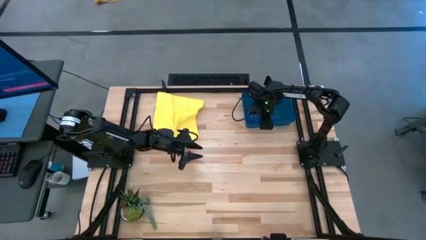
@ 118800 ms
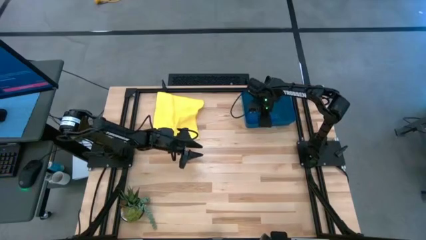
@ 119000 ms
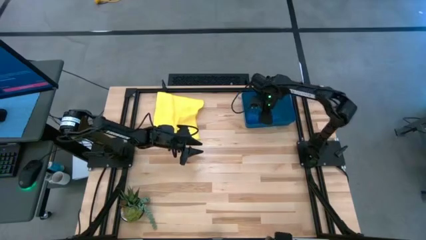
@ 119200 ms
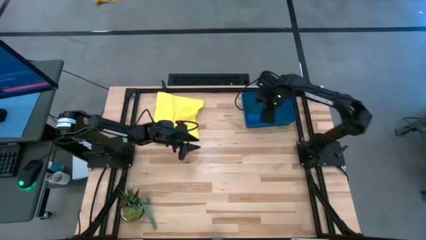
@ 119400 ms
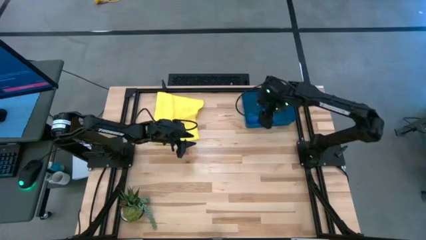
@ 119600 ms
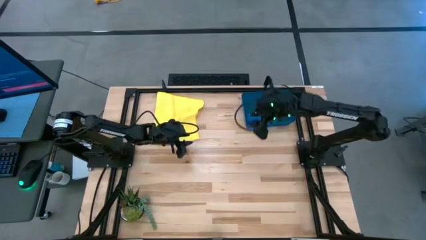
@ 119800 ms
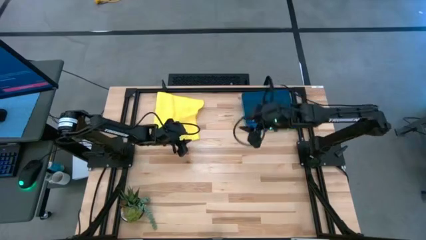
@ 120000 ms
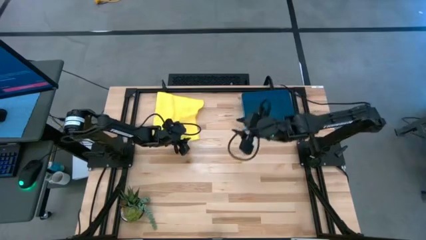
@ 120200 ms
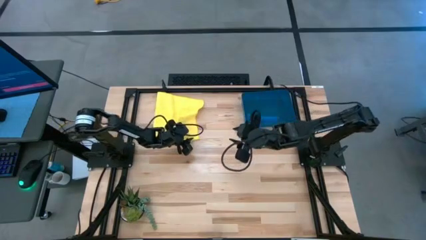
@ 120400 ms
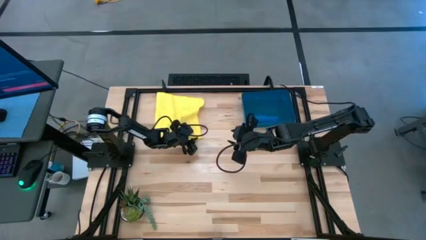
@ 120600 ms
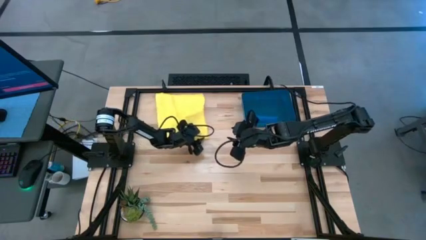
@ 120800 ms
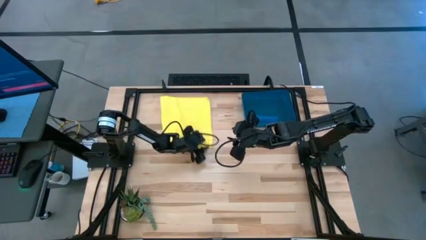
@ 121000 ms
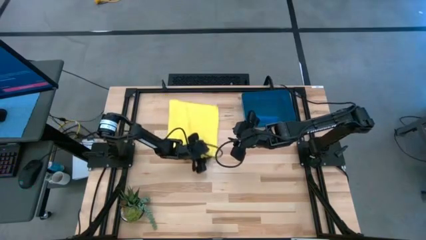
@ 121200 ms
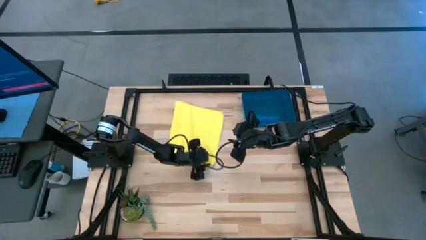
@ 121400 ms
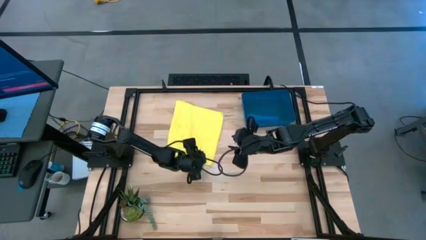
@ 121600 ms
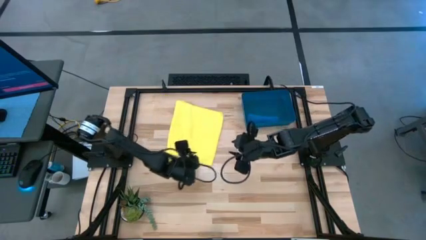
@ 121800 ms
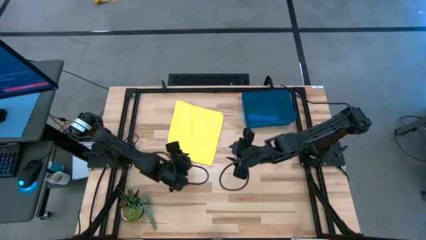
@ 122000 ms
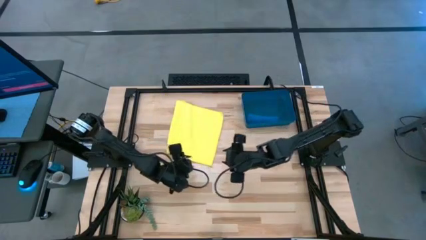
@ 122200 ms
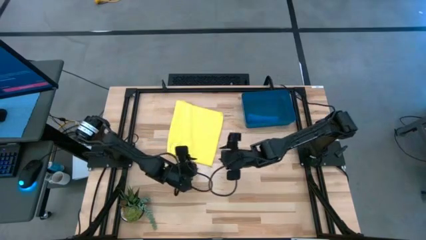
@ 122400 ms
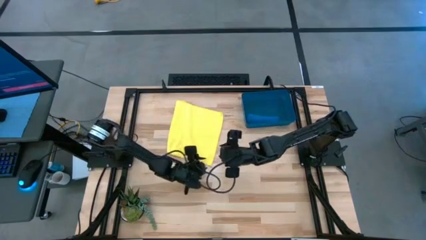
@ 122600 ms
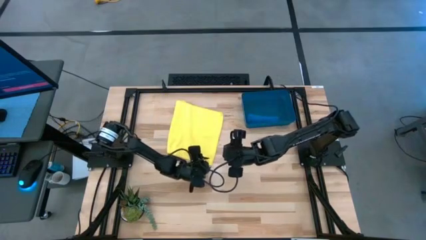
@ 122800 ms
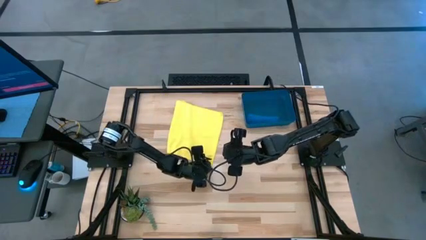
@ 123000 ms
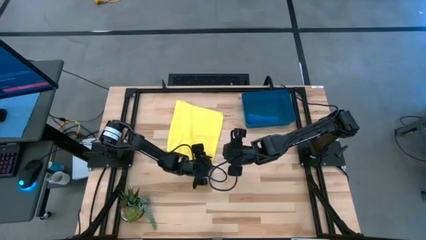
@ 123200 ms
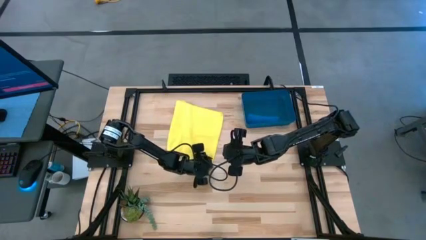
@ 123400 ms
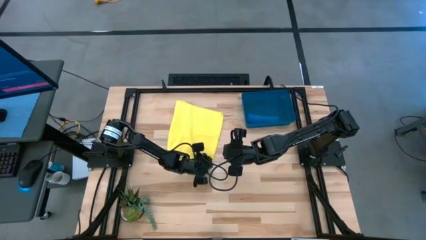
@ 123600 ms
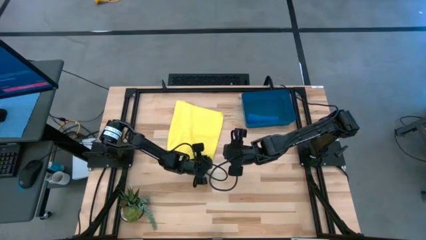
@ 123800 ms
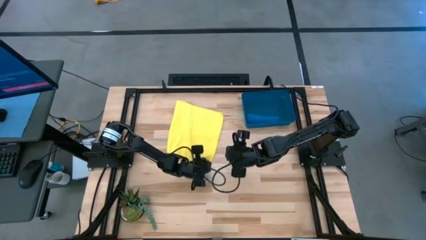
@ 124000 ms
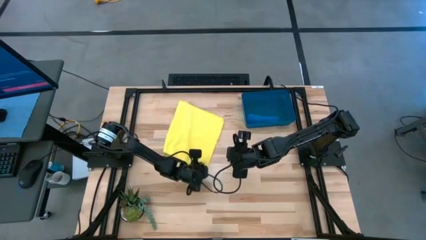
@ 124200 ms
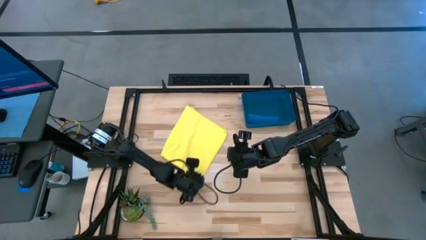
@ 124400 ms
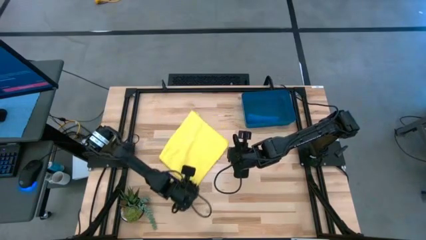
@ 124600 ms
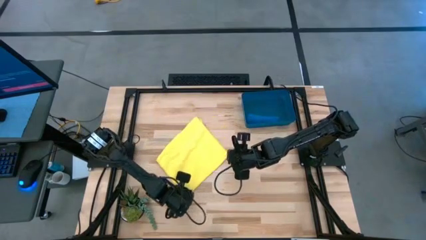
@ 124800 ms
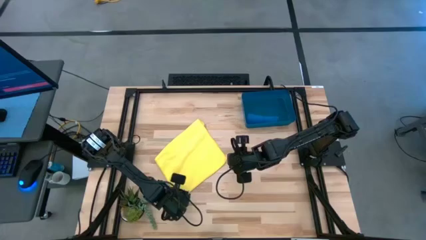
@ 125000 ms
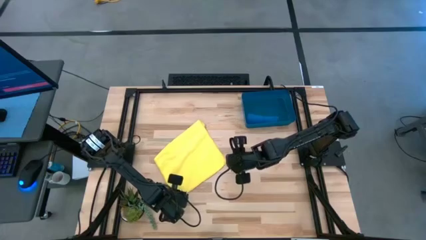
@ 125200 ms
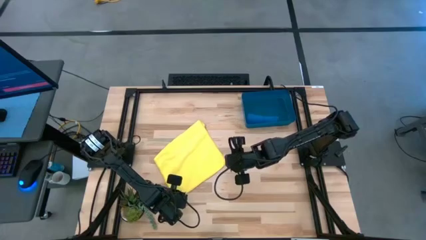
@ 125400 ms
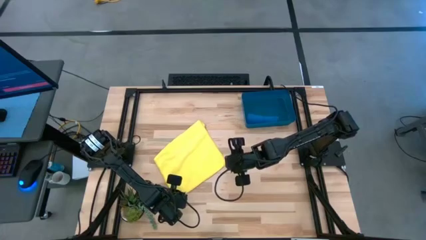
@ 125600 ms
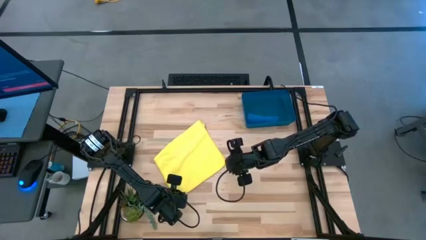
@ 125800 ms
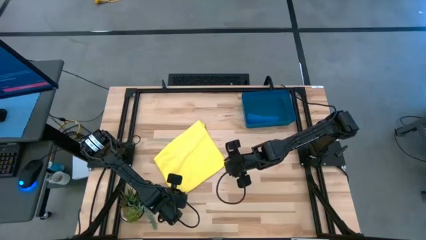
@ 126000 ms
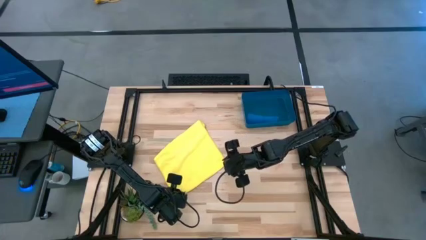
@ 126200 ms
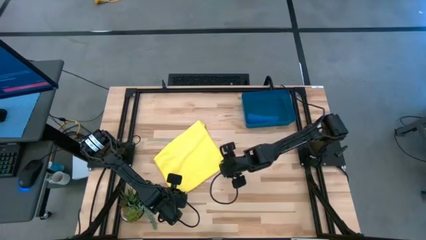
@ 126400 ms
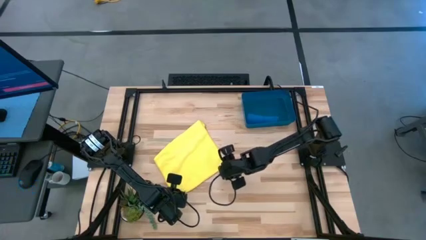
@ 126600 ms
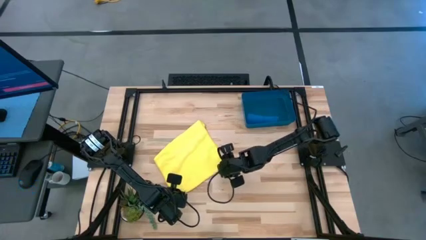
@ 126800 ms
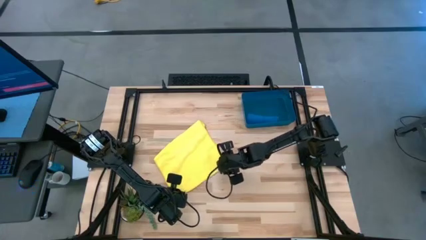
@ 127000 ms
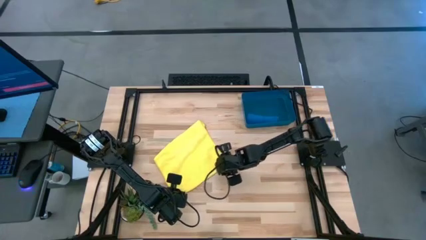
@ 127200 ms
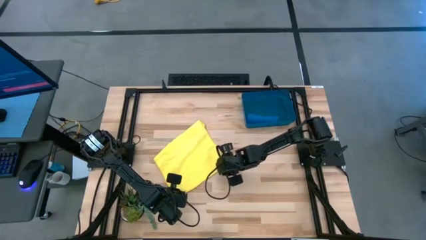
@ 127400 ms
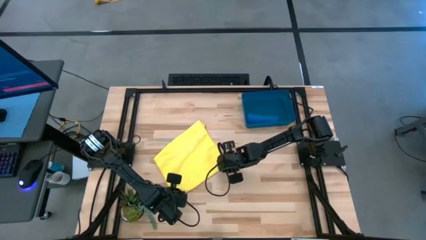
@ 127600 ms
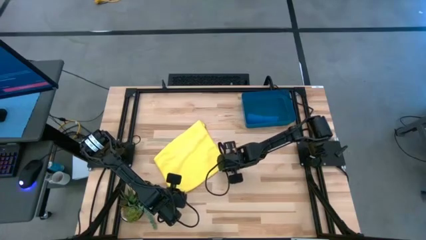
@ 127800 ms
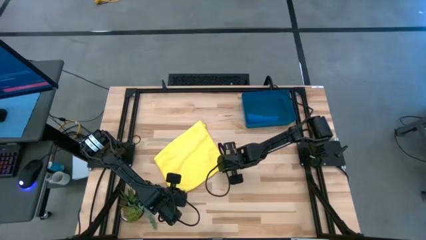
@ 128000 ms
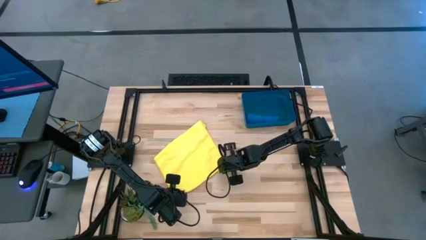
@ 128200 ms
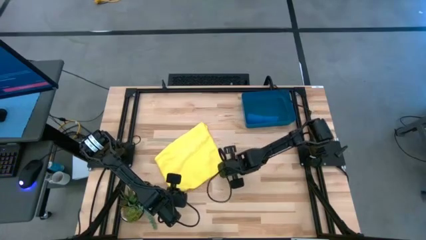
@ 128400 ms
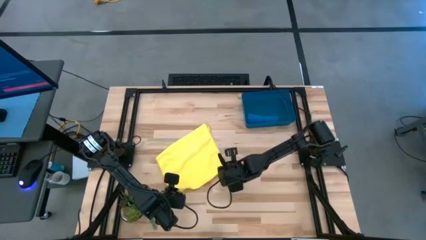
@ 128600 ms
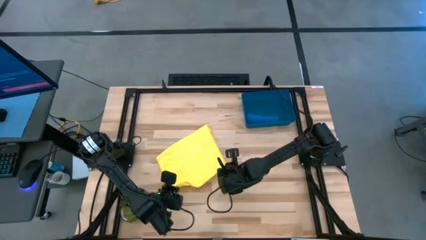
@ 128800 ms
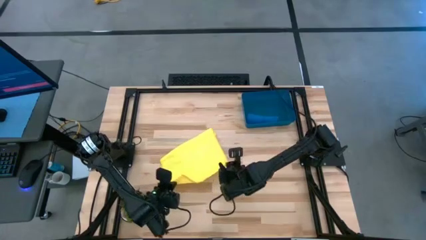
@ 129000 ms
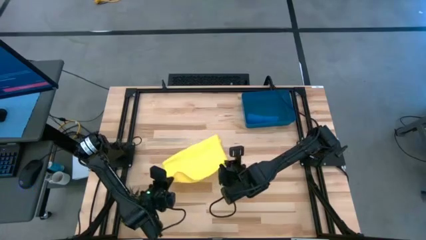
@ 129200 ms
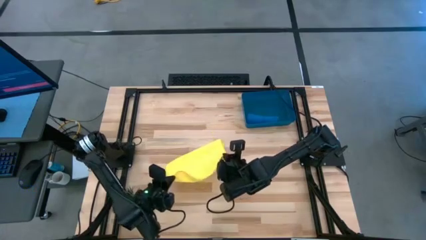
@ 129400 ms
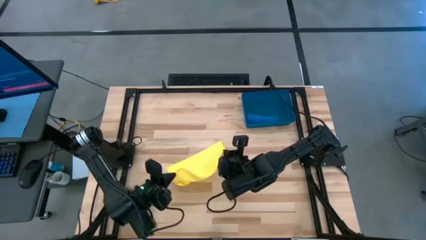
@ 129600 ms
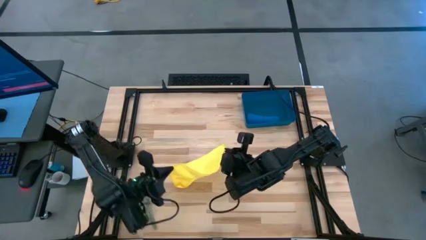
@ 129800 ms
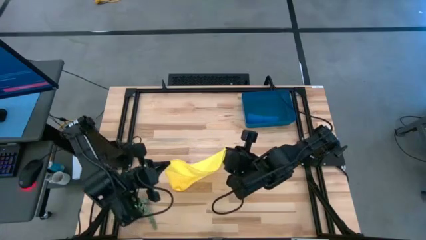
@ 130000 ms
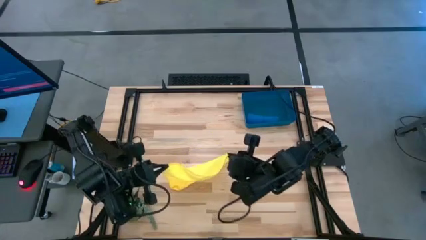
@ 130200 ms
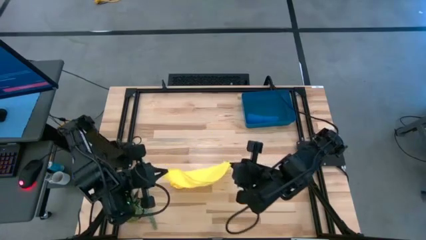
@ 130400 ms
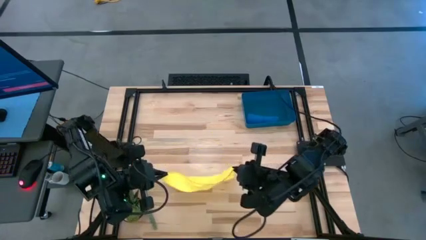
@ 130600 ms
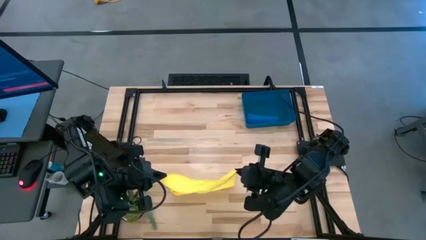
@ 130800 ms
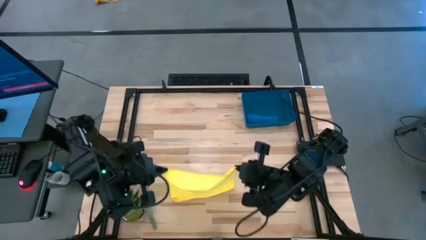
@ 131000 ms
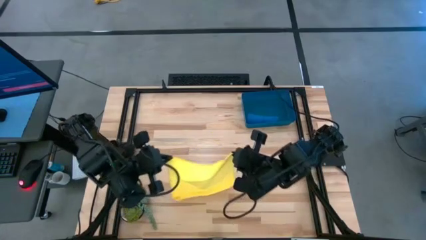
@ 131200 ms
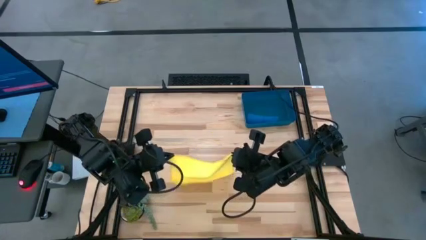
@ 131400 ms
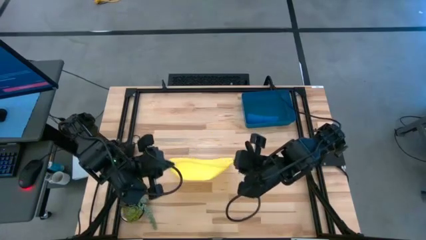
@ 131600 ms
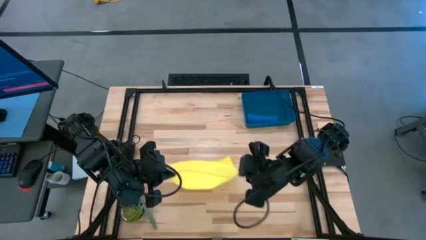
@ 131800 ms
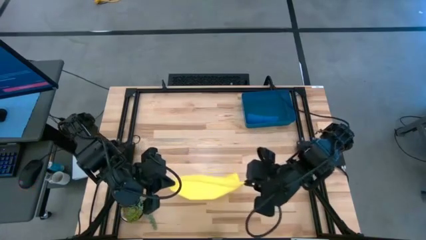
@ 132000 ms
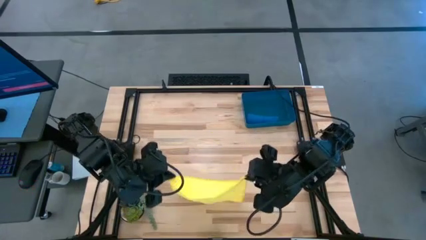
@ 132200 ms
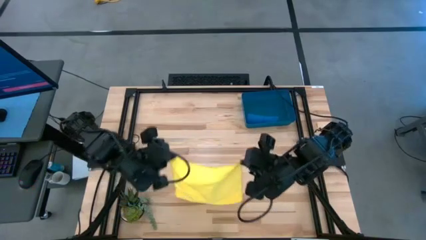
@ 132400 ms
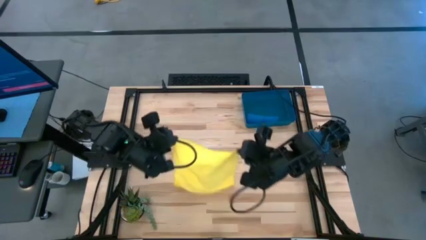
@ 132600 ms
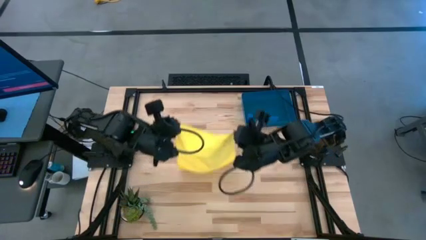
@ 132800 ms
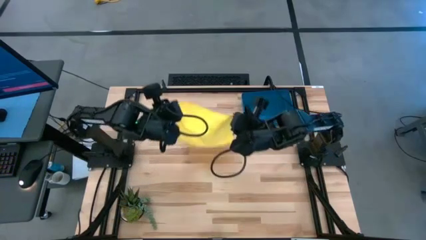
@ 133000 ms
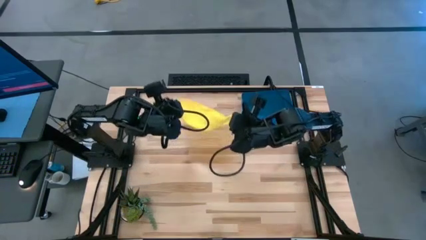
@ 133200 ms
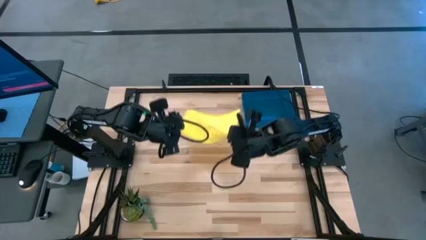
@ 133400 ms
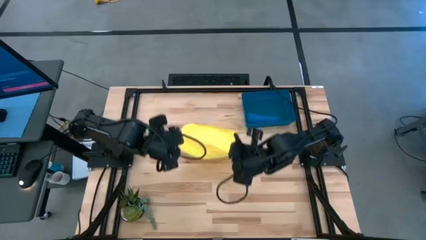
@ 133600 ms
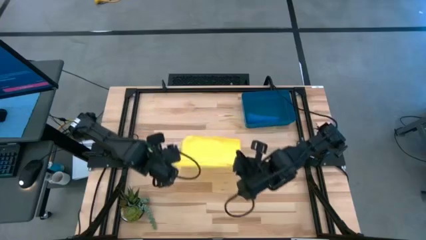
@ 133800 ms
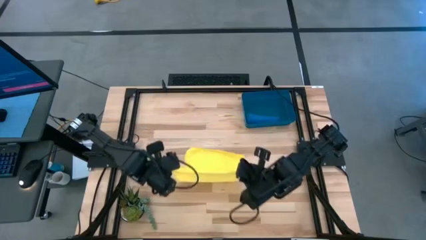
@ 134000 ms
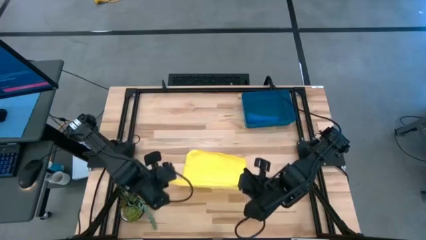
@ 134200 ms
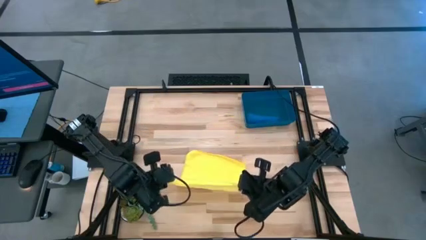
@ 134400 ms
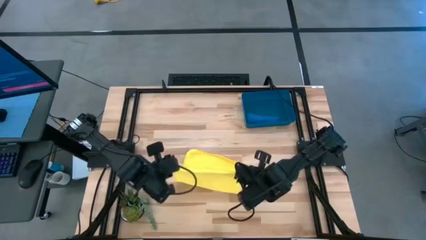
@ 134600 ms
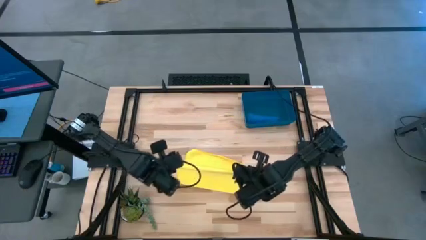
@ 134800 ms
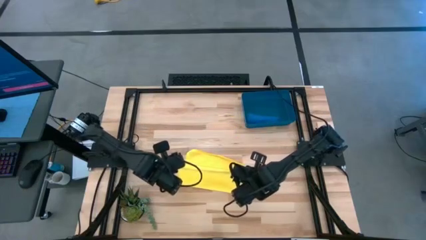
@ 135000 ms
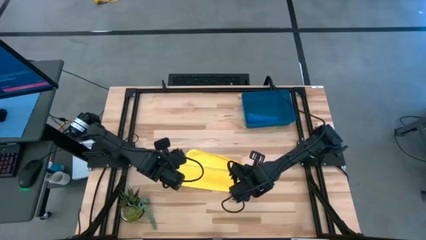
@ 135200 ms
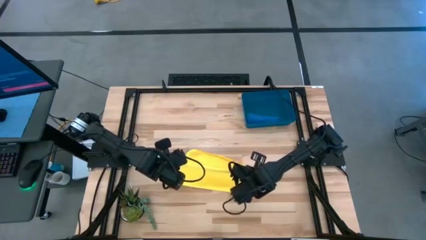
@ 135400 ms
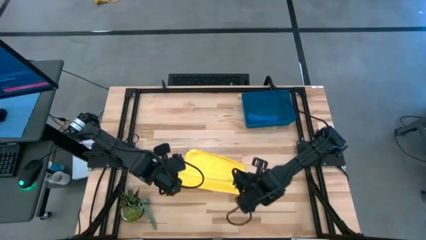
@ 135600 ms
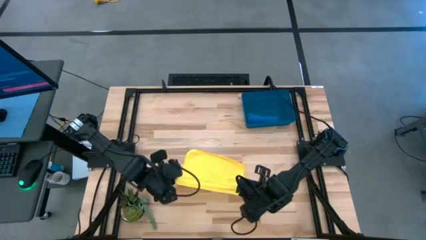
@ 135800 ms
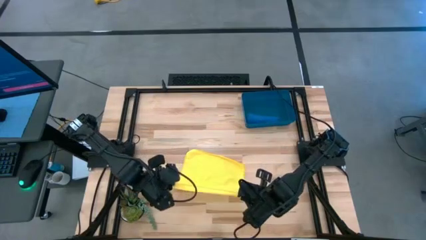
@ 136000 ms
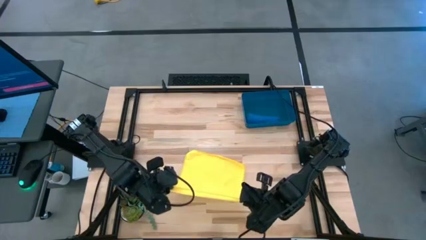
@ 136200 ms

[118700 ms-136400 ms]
Task: Roll microfiber towels into tight, uniform cylinder then place into a basket
Roll the yellow microfiber cloth
